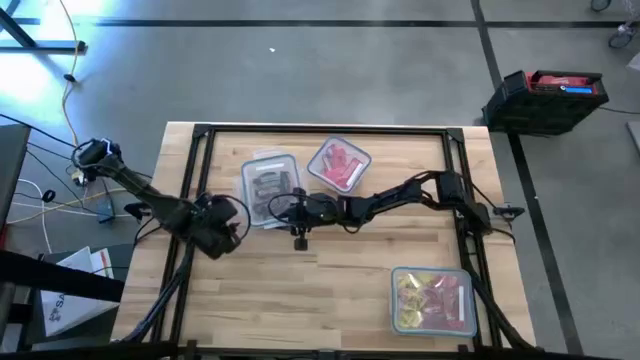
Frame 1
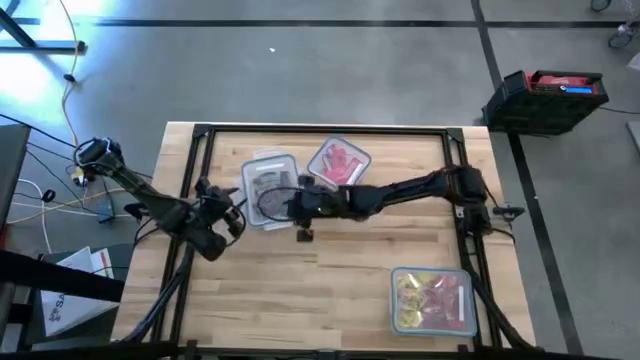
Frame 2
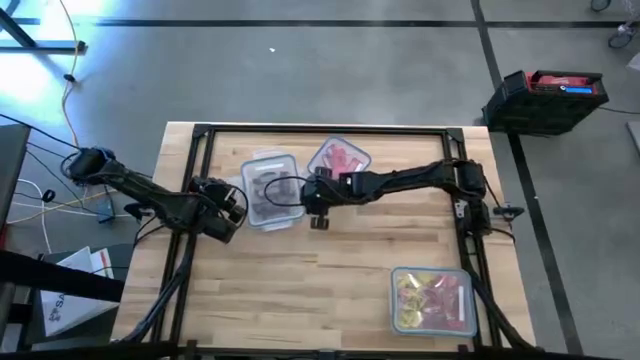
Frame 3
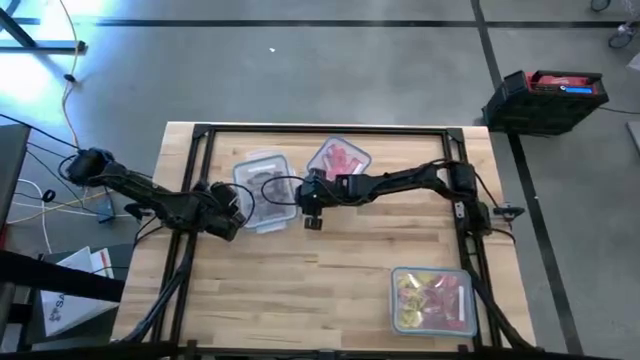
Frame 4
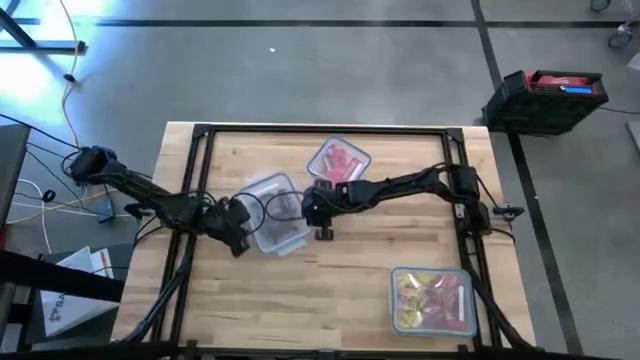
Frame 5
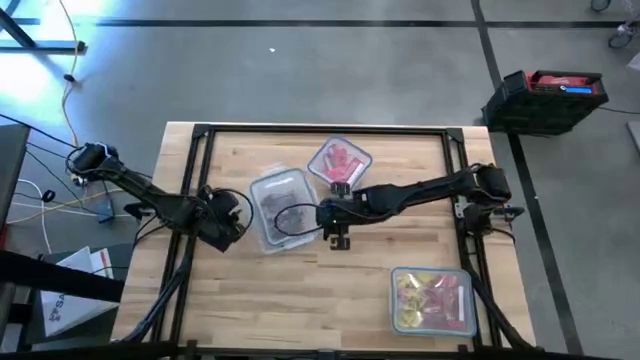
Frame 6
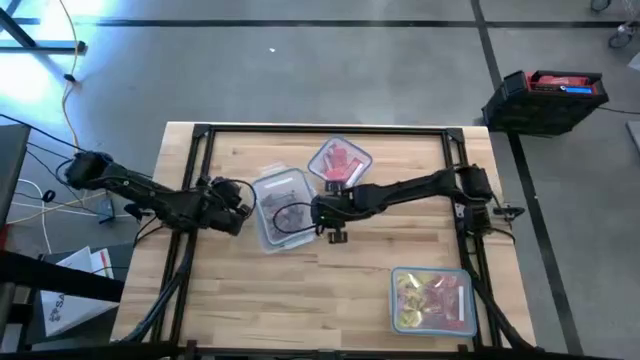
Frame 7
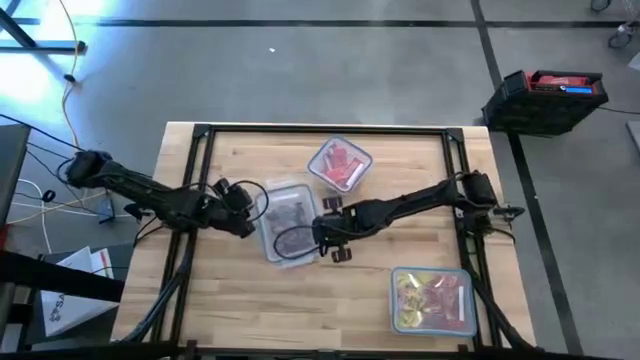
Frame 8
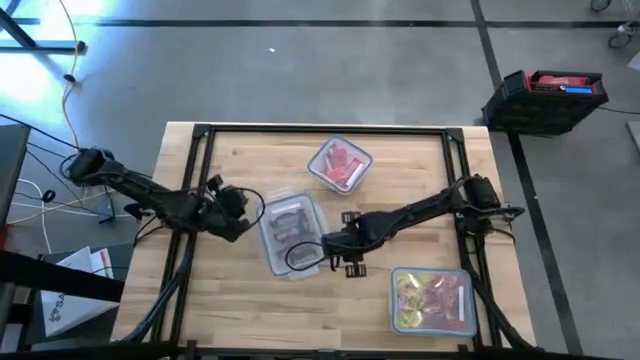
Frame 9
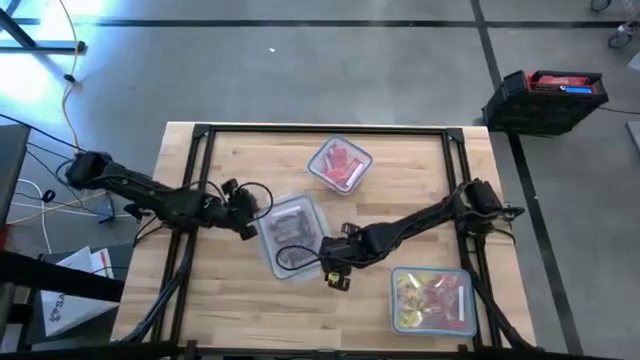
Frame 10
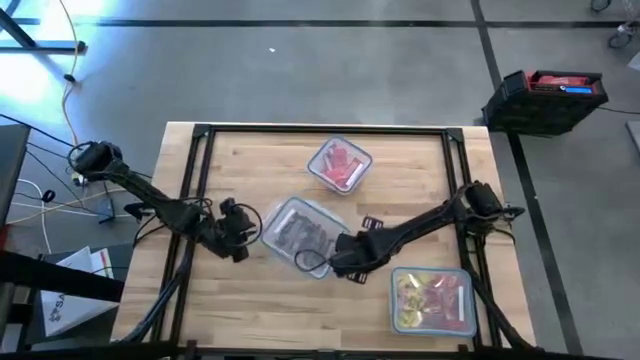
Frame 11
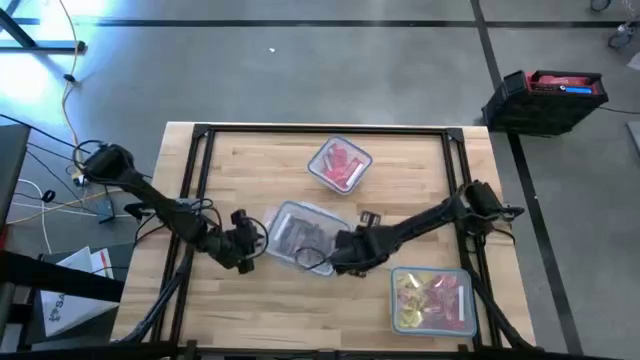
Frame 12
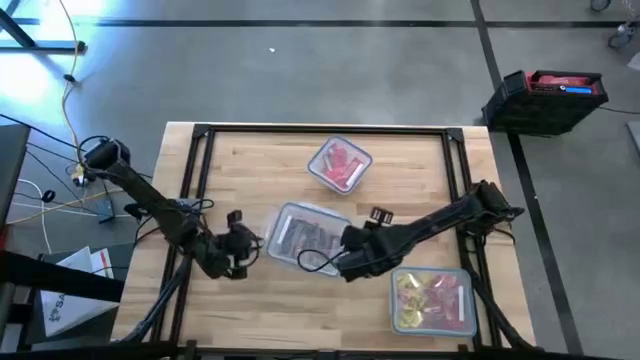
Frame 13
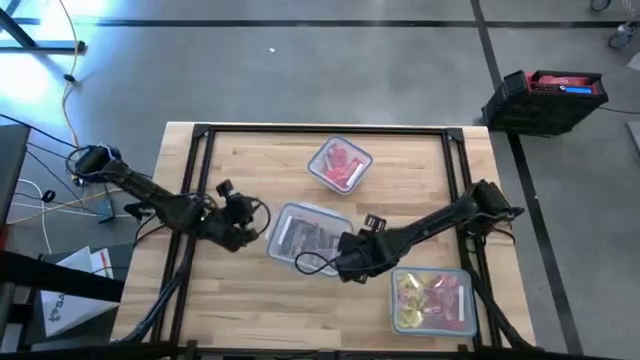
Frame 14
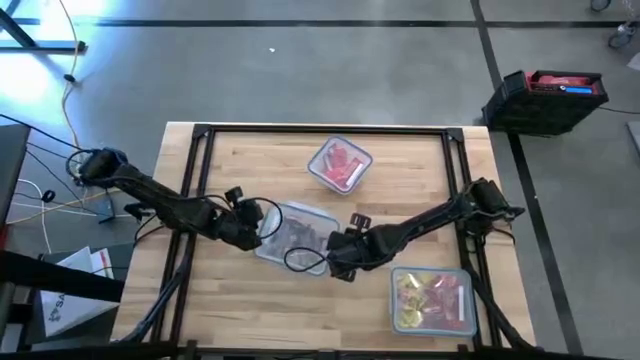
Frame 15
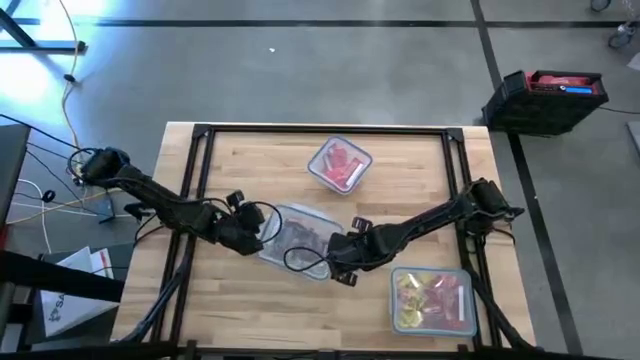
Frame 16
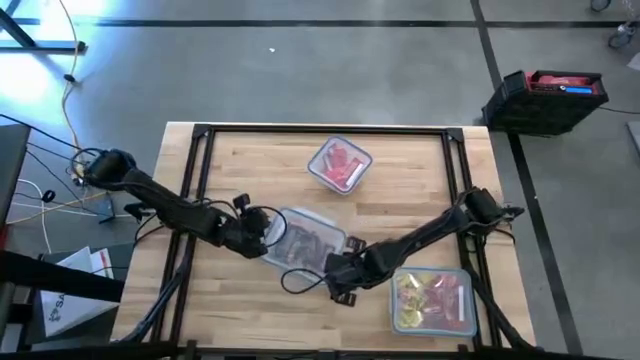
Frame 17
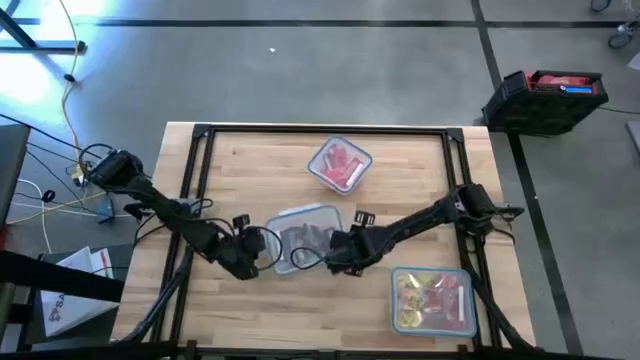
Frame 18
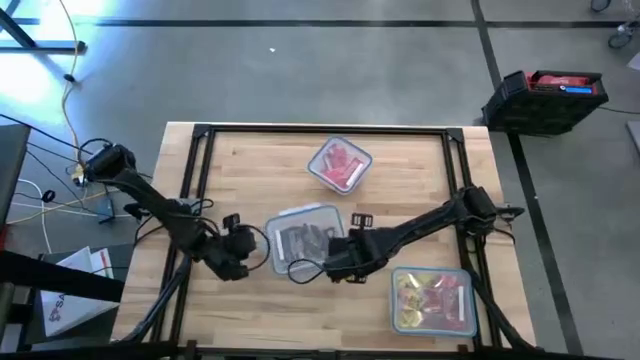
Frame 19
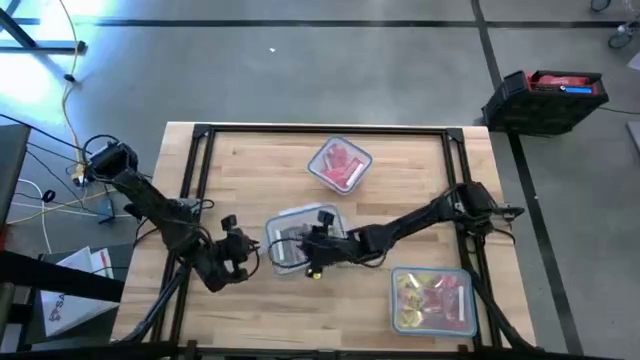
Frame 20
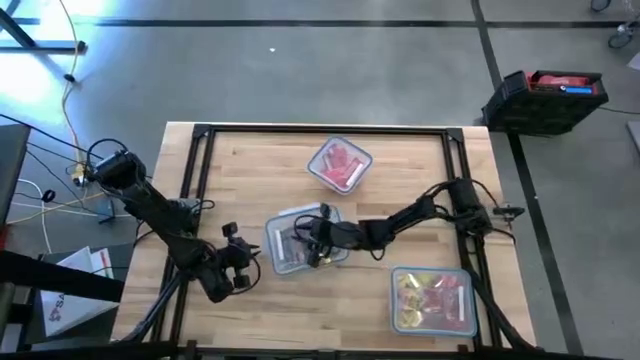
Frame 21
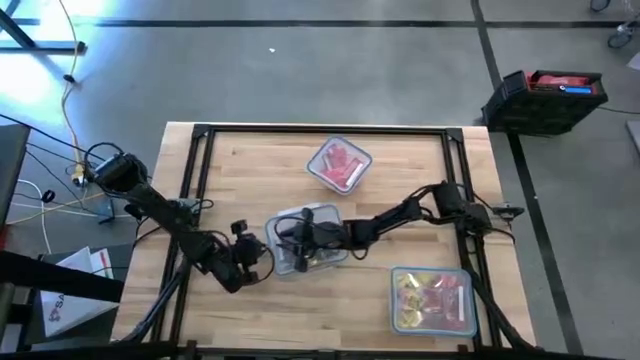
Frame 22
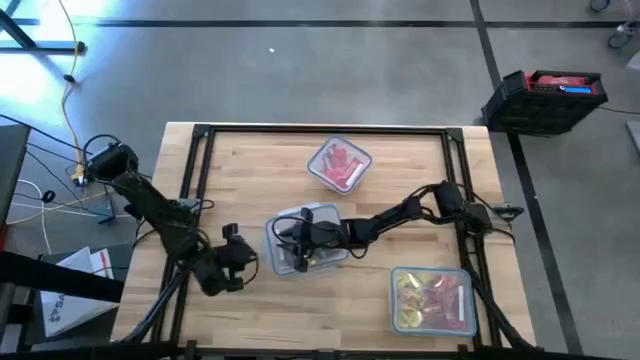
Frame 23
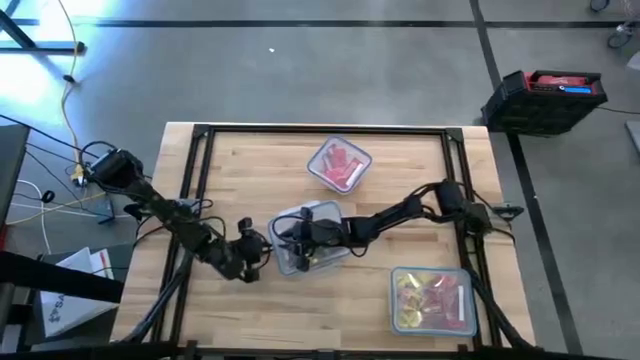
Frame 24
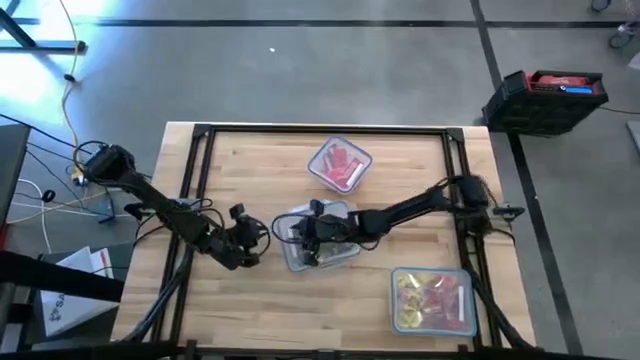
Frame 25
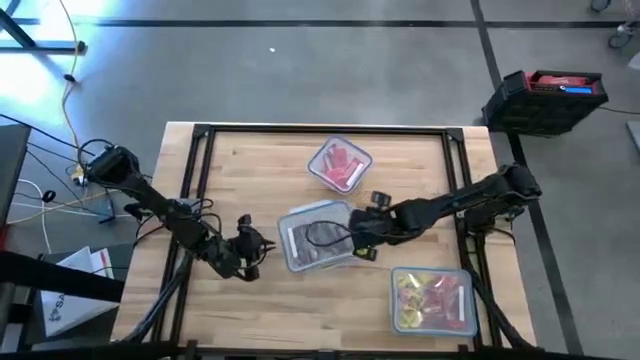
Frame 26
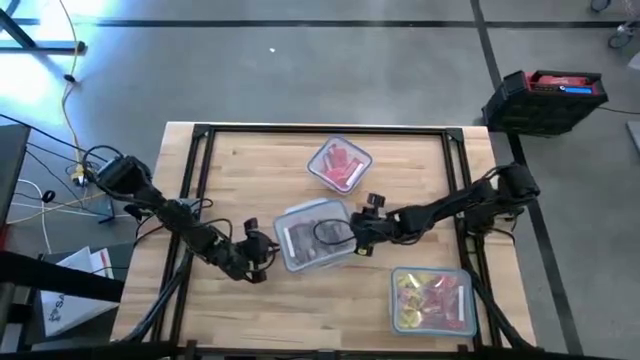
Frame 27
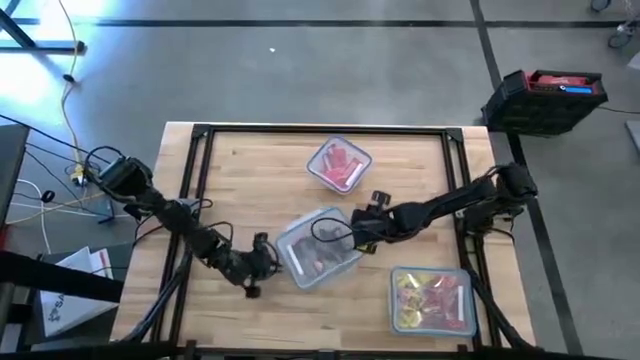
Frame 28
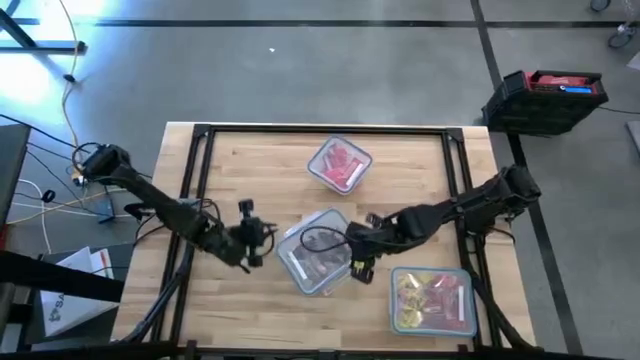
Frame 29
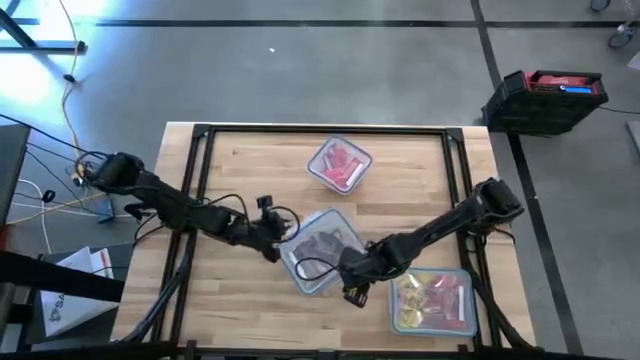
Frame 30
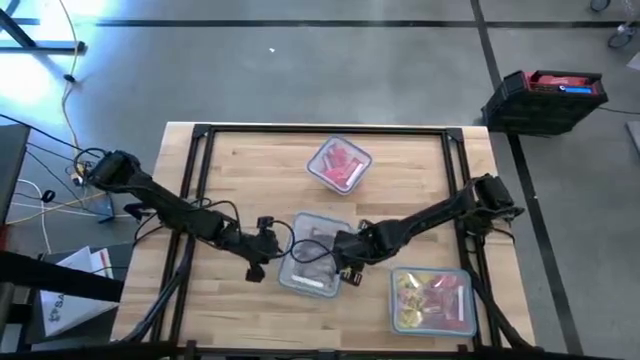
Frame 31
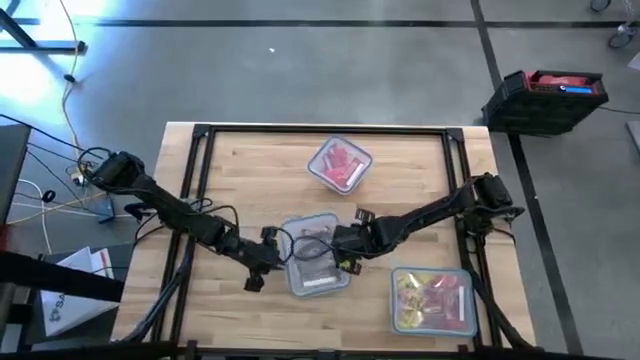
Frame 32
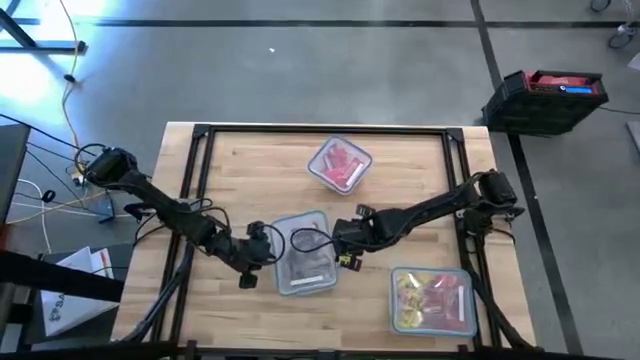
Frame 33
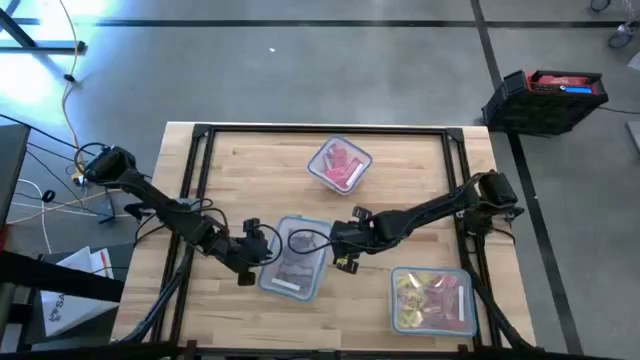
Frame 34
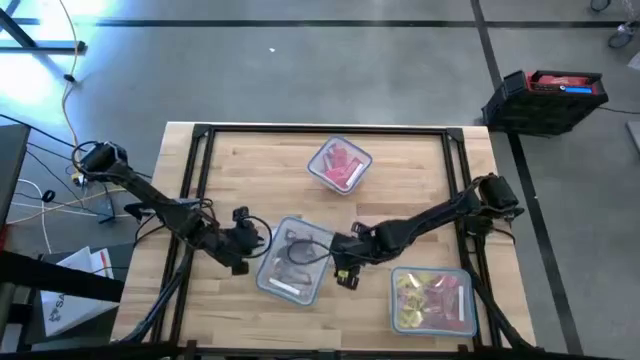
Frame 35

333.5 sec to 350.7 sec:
Task: Sort candy
Return to Home Position

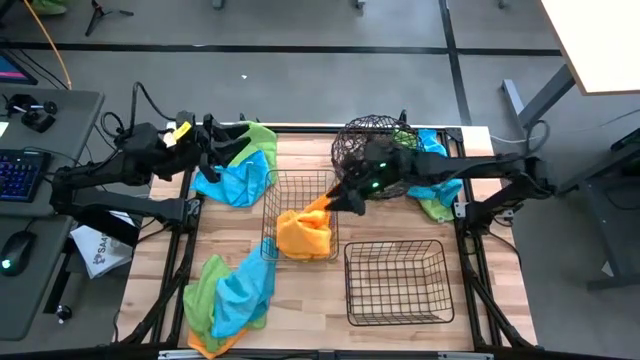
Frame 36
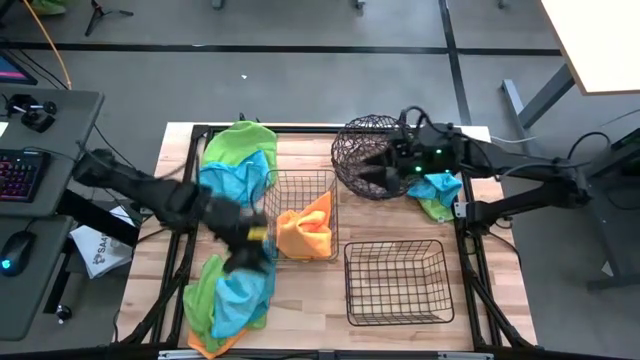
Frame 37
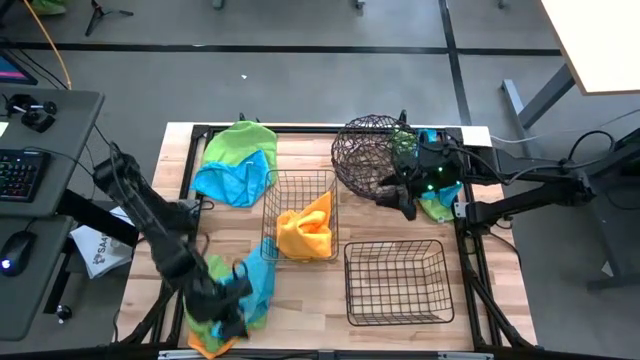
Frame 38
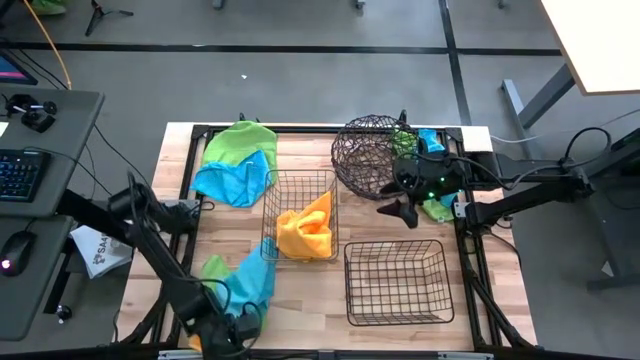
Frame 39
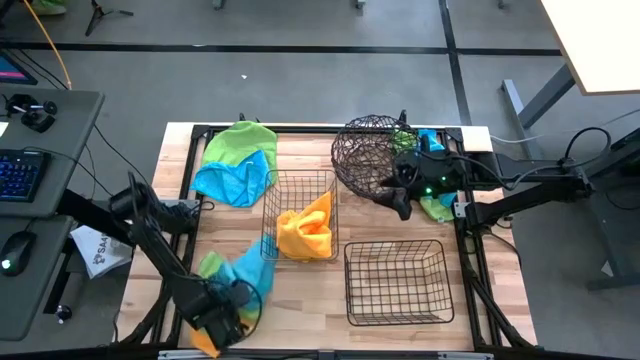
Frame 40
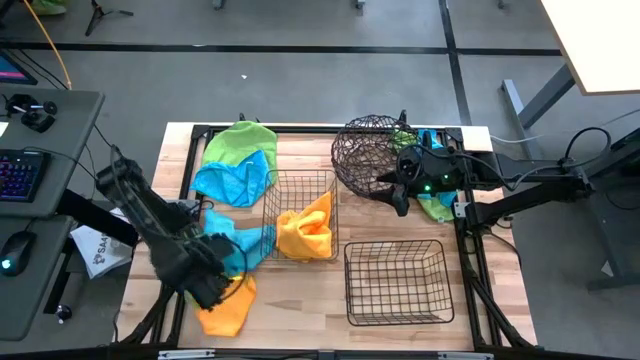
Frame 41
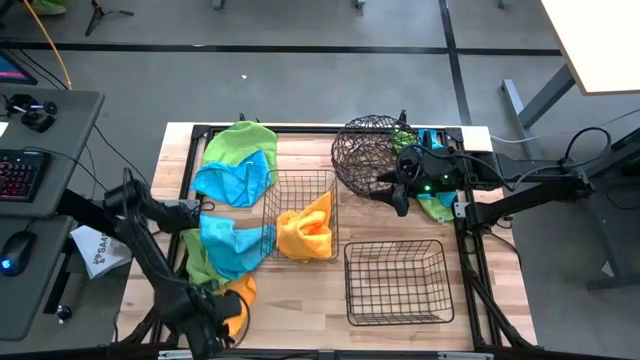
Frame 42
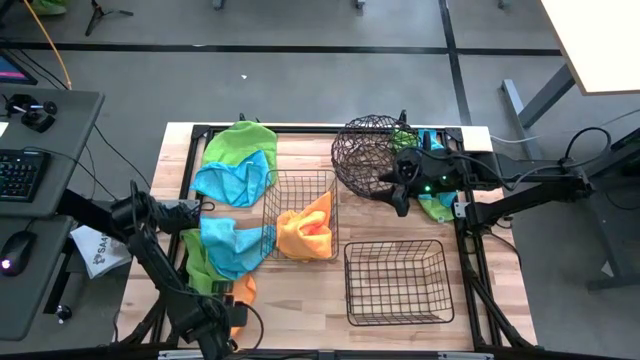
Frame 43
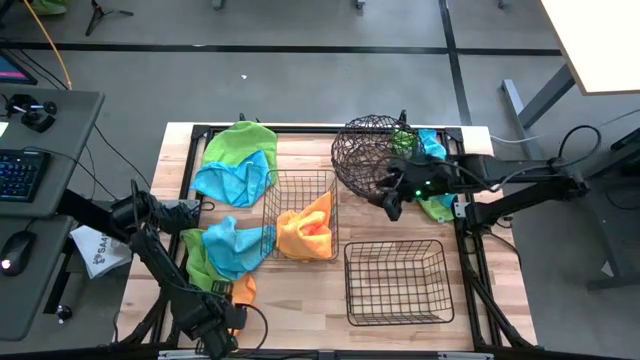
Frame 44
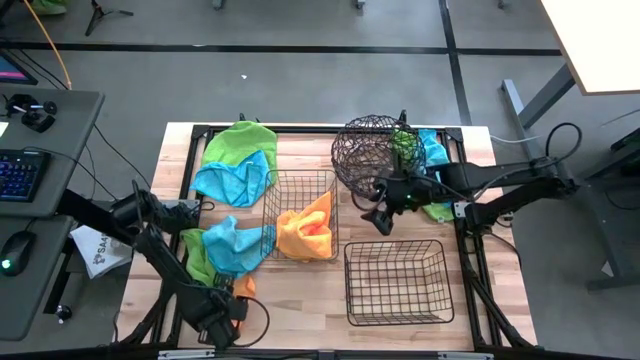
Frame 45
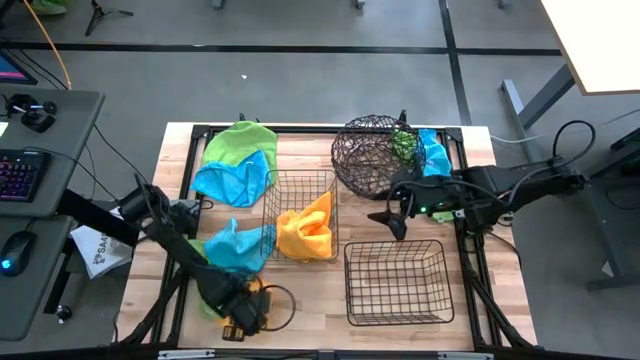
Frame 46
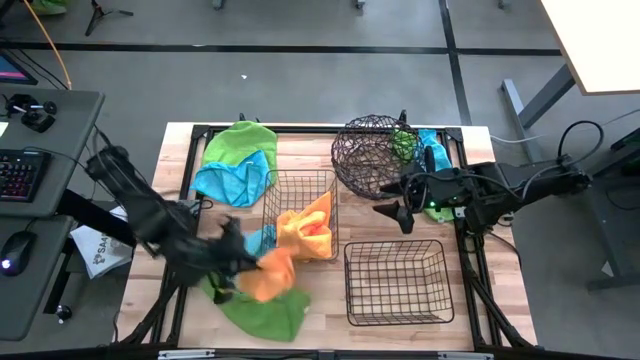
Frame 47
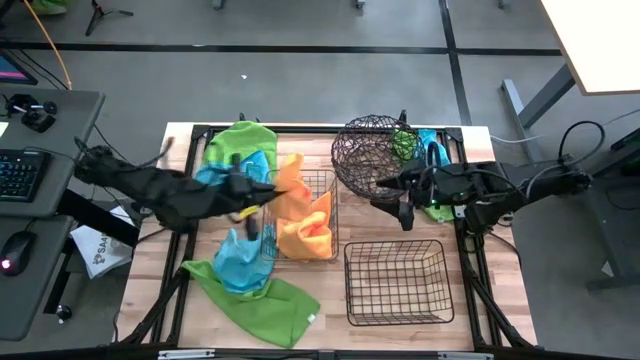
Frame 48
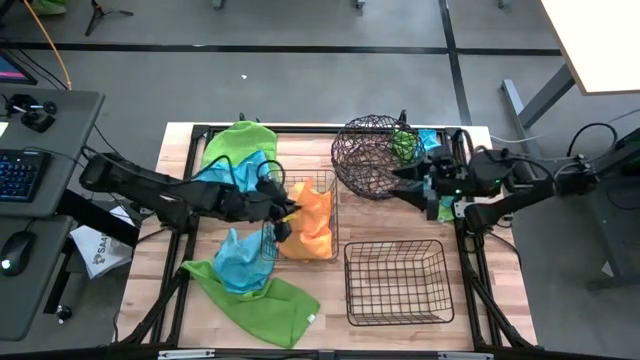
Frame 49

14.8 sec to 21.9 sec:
Task: Sort microfiber towel by color & place in baskets
Put the orange microfiber towel into the center black metal basket
